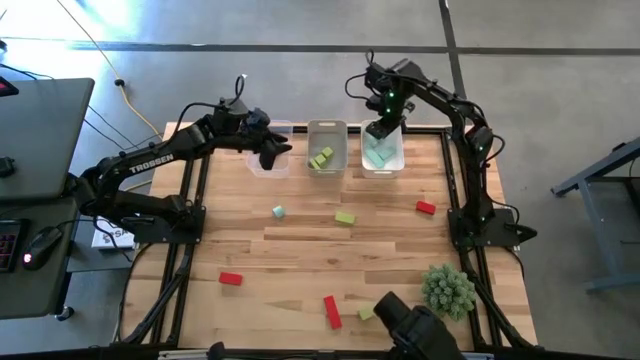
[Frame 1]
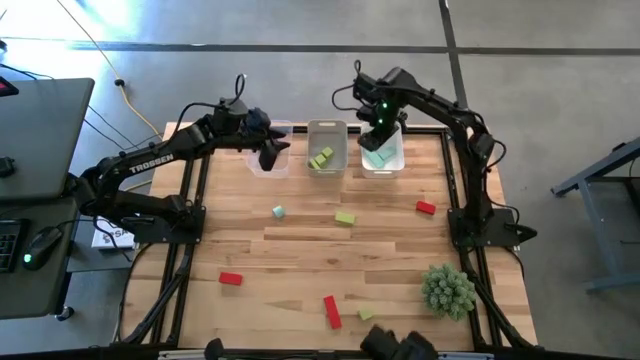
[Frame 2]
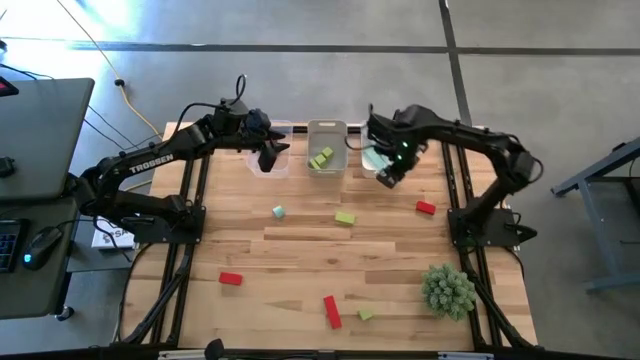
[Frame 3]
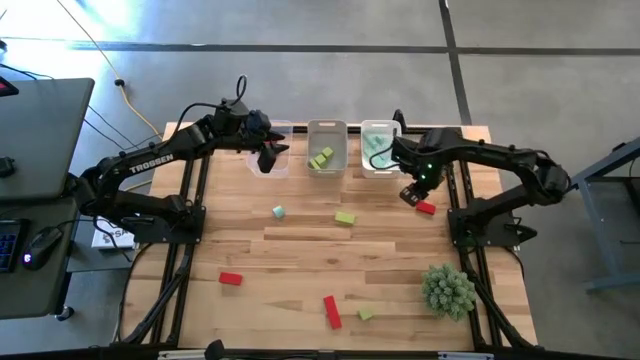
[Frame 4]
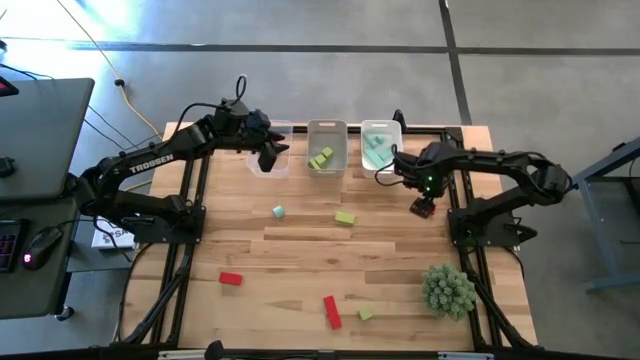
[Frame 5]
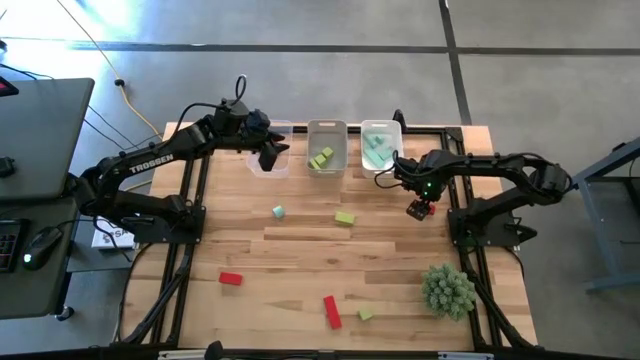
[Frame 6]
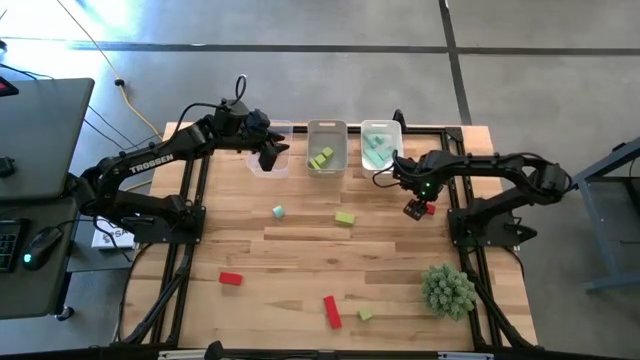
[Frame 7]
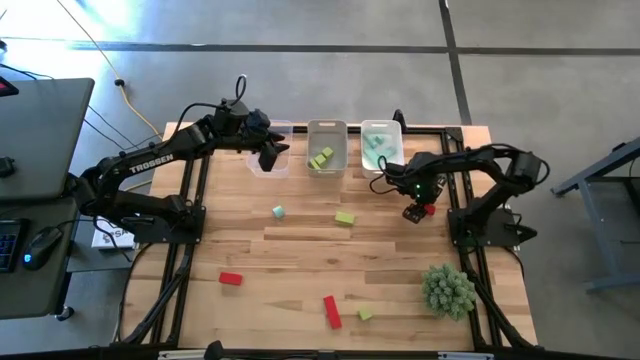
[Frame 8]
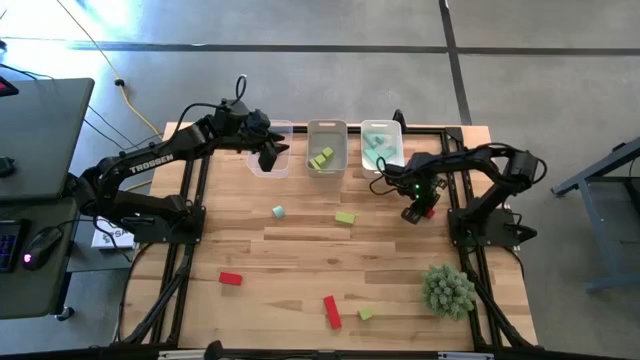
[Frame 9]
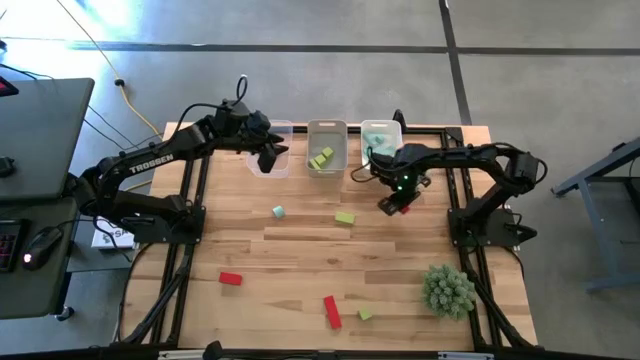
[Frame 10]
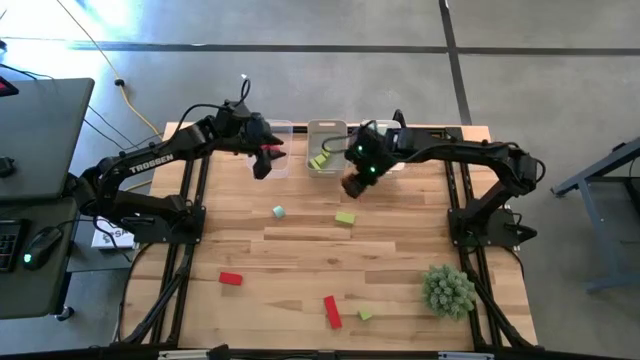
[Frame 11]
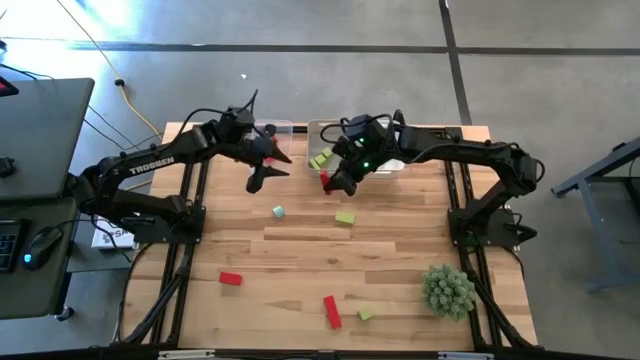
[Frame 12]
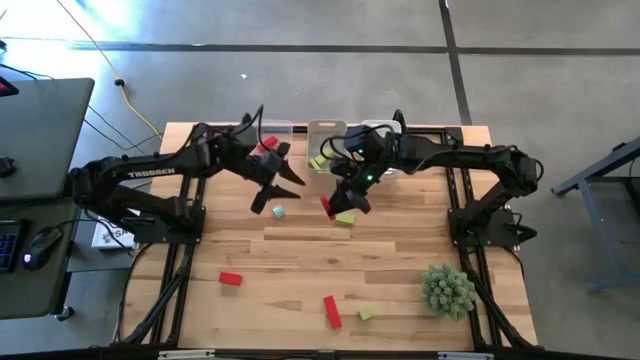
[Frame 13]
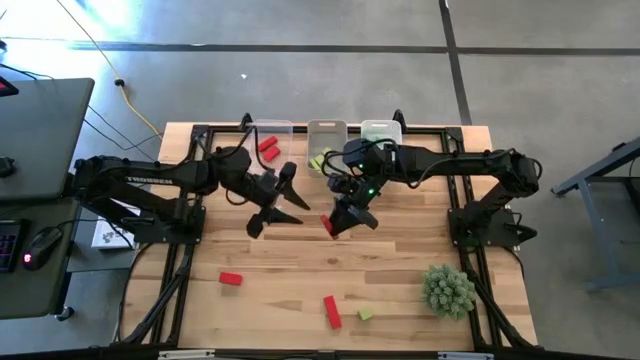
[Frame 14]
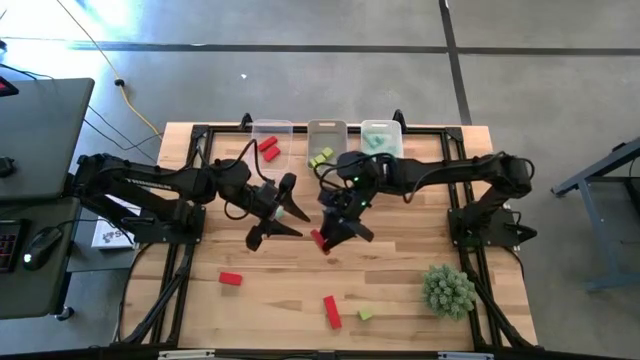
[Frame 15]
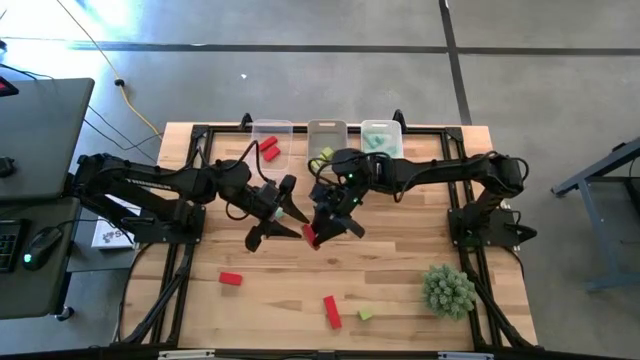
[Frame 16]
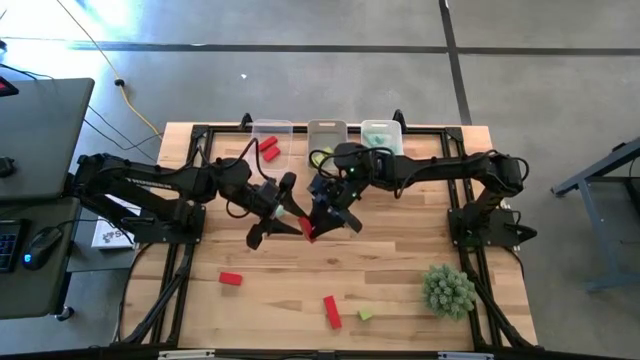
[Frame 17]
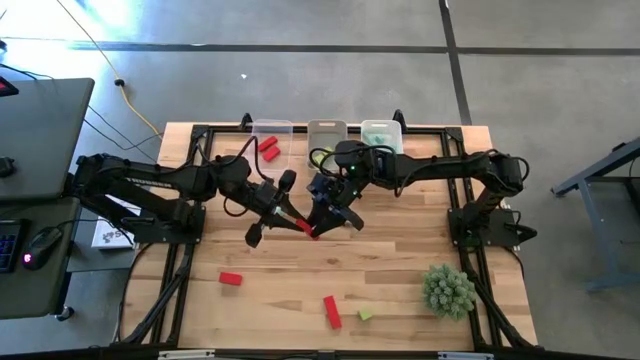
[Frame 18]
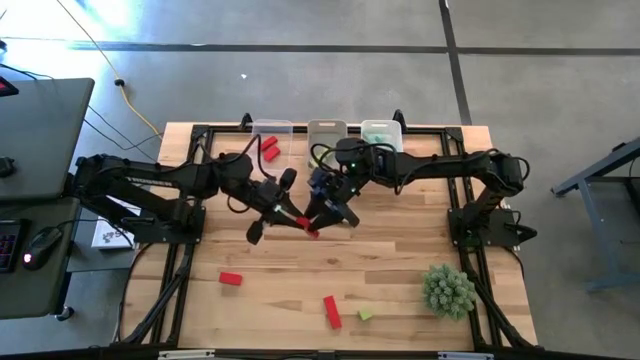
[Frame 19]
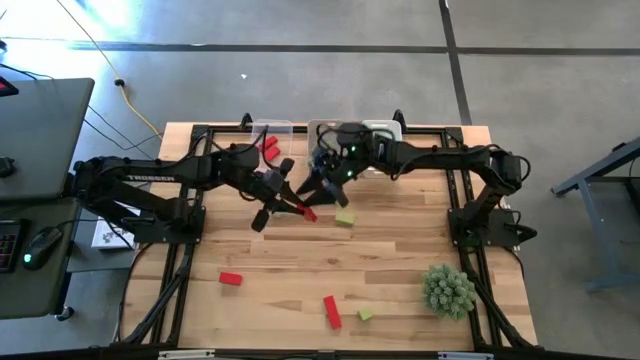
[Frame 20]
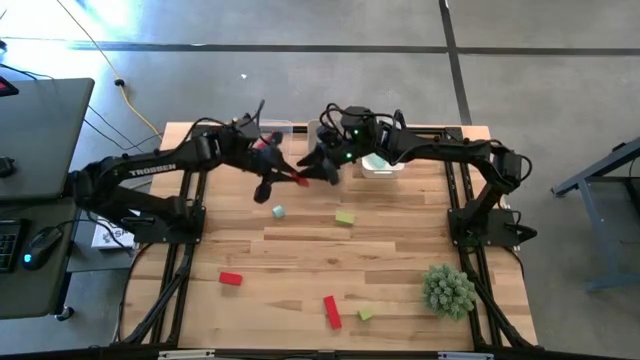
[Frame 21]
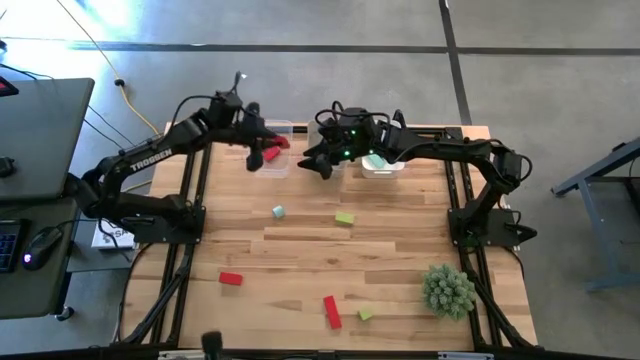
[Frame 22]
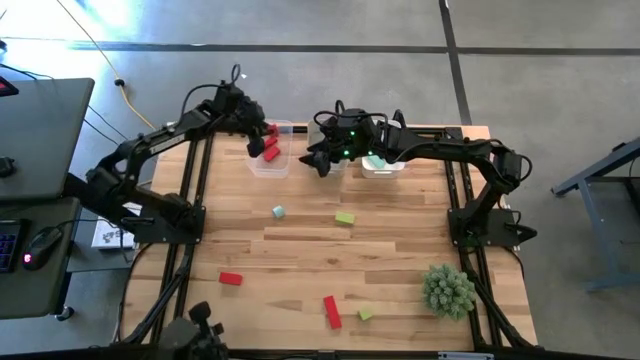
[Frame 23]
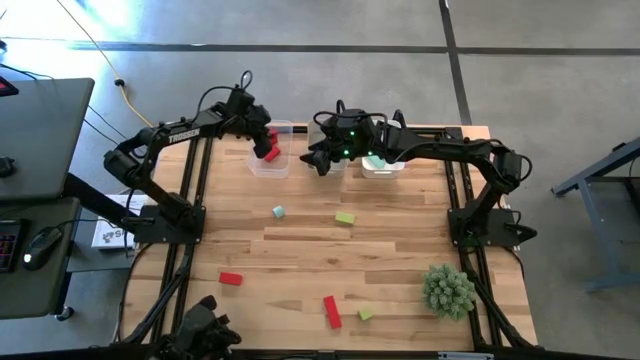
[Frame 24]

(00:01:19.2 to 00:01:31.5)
Task: Sort & place blocks by color
Put the red block into the transparent bin

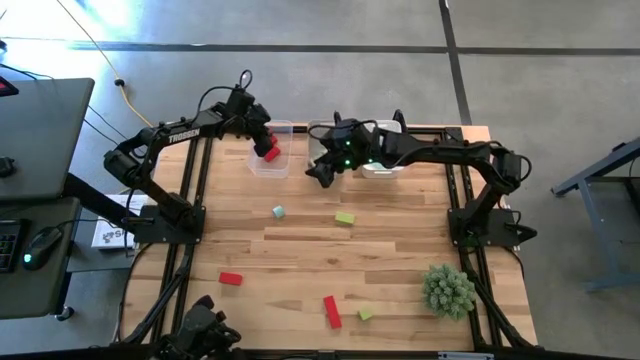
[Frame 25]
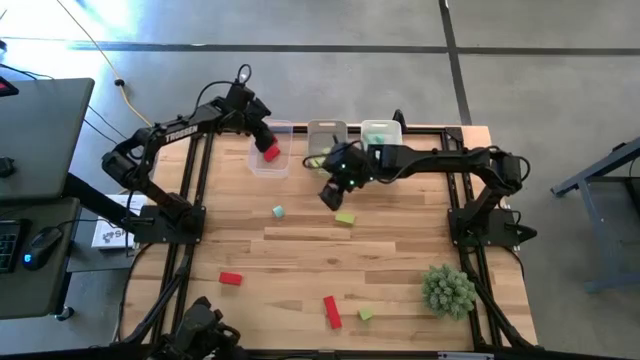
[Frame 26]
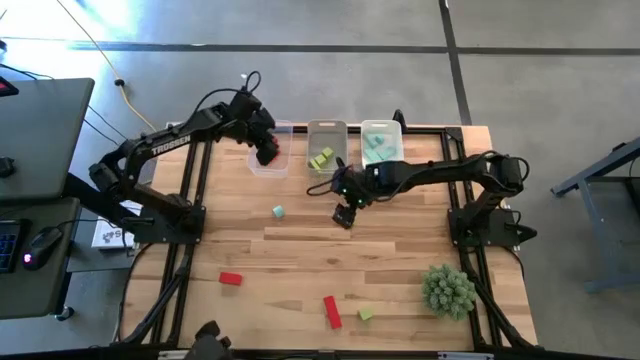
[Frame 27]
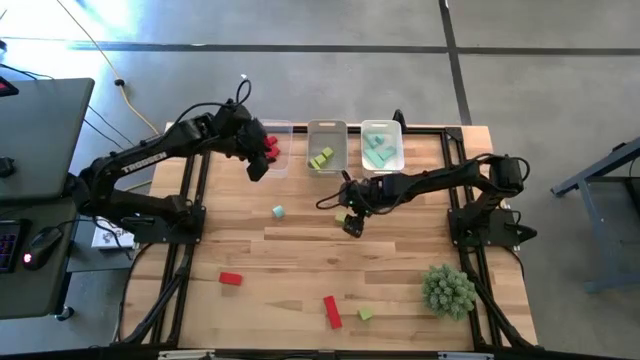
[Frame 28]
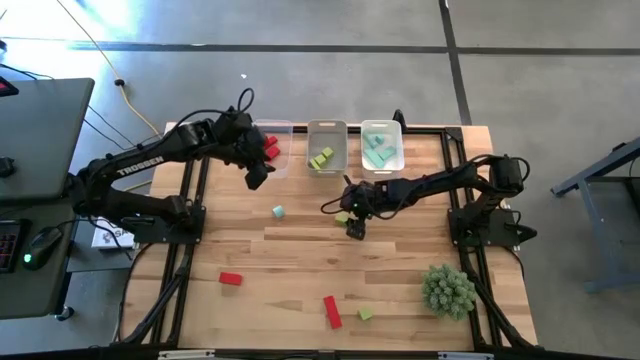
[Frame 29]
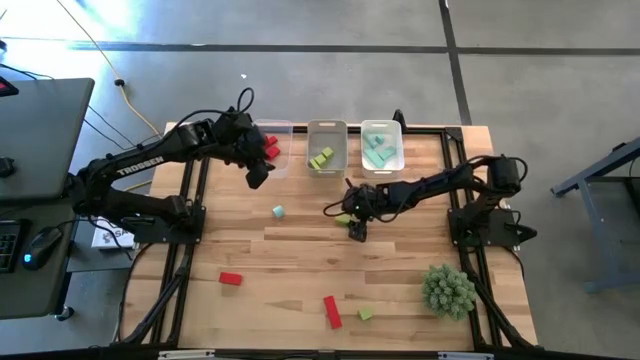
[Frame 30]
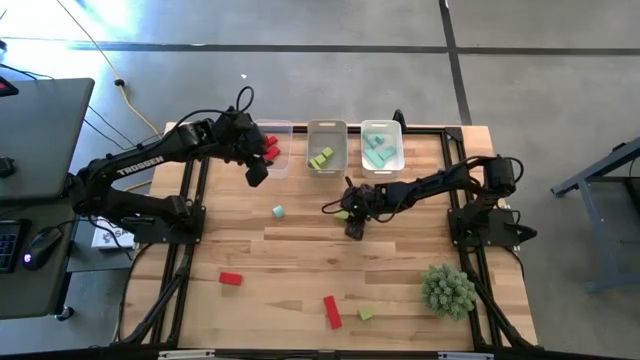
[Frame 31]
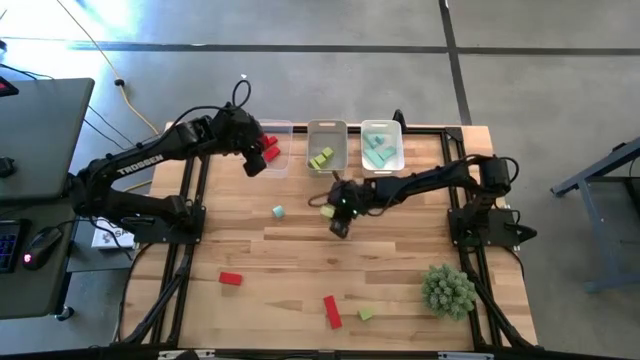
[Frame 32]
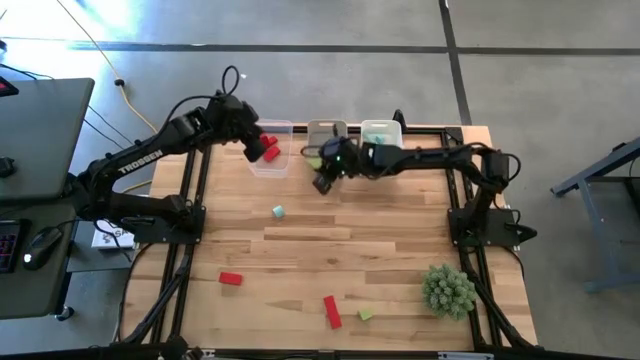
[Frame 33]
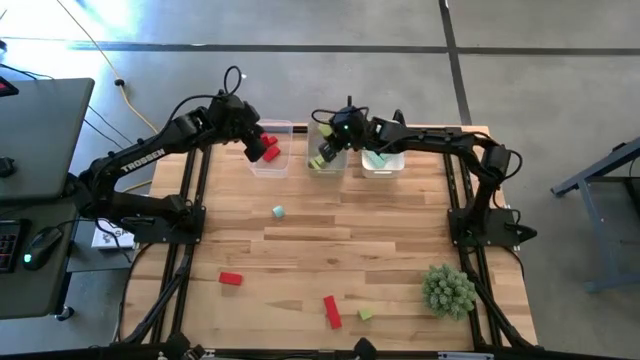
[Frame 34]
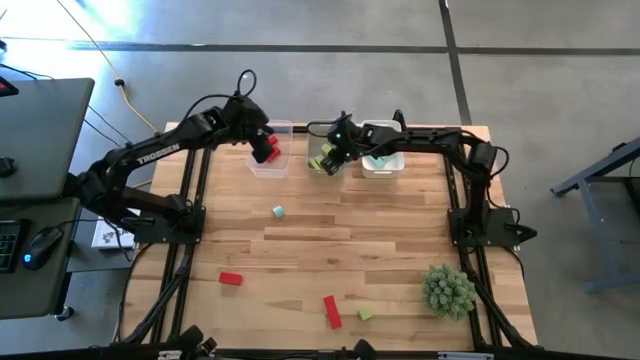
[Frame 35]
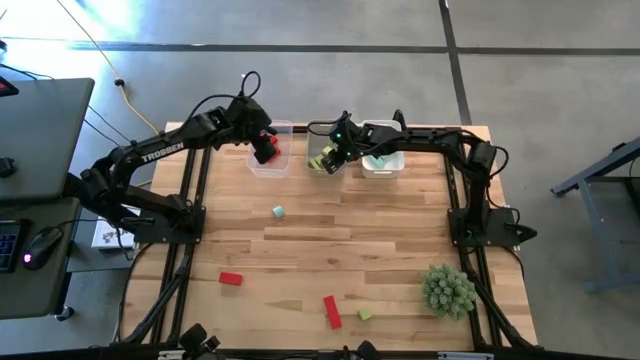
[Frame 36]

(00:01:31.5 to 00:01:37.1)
Put the green block into the gray bin

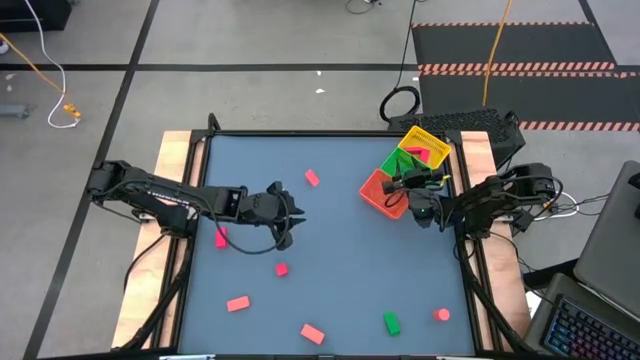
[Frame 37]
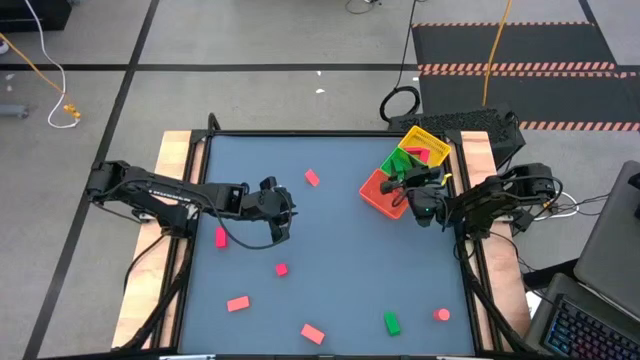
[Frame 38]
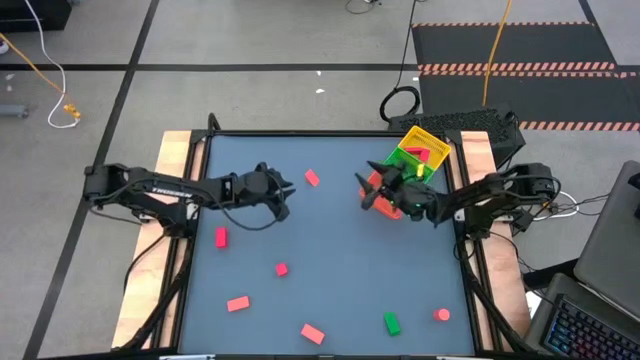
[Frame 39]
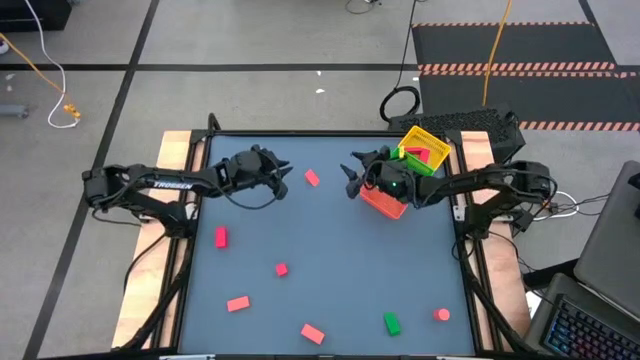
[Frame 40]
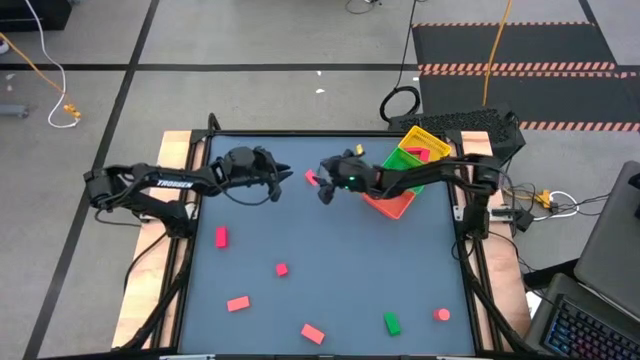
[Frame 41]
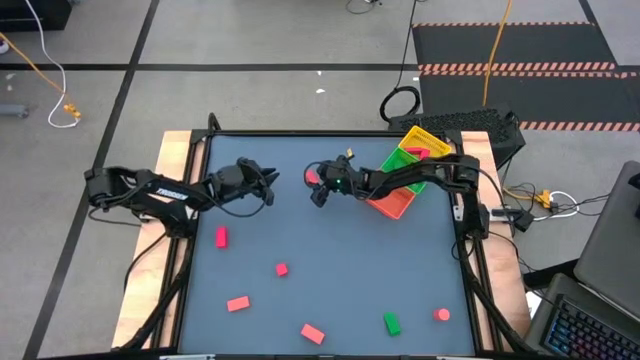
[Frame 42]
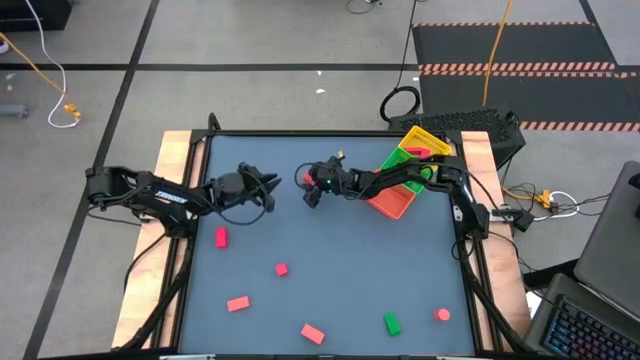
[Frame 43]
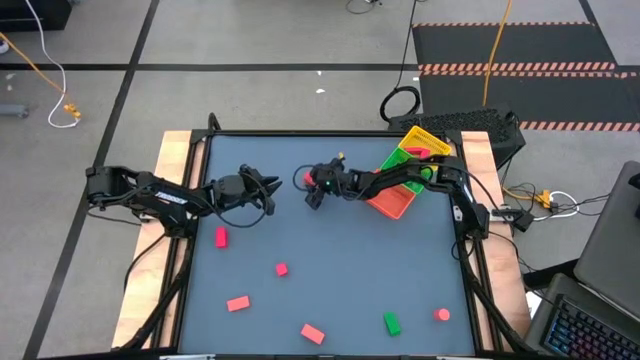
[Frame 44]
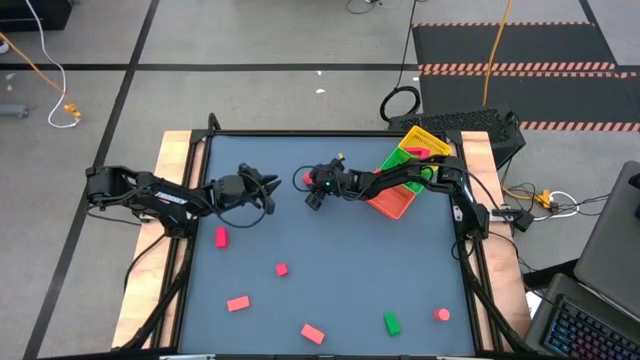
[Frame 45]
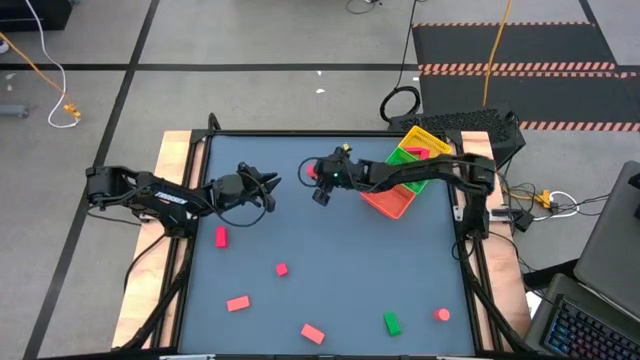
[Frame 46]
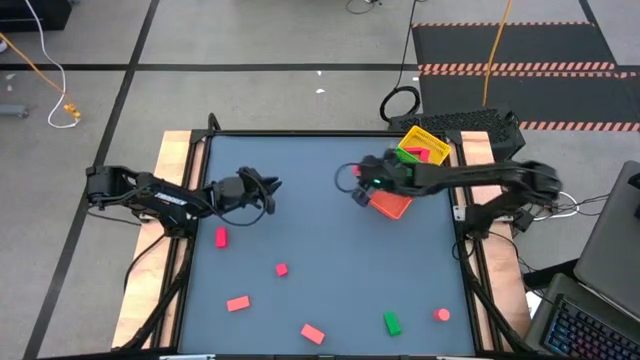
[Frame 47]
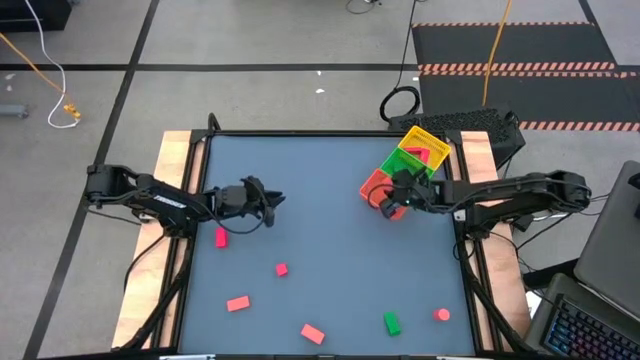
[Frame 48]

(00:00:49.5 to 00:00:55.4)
Task: Sort & place blocks by color
Put the orange block into the orange bin
